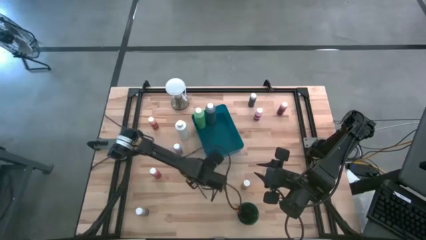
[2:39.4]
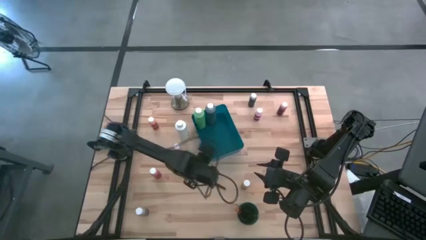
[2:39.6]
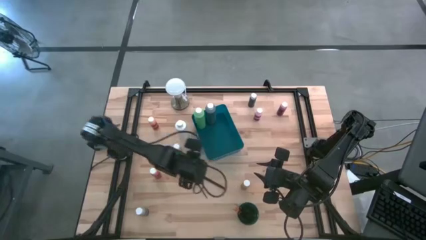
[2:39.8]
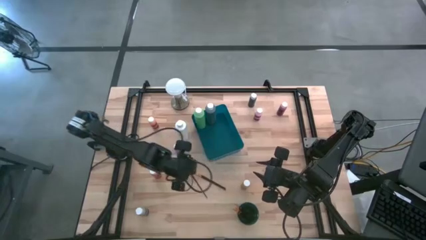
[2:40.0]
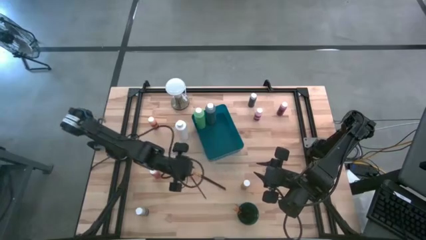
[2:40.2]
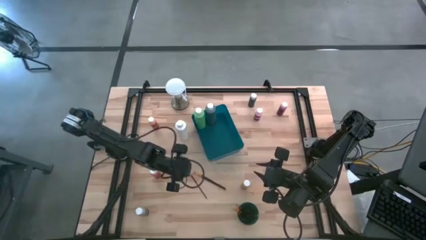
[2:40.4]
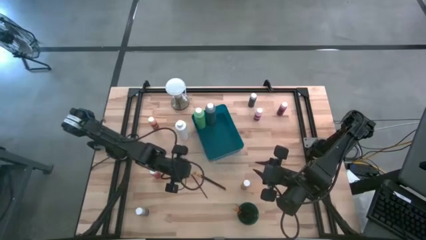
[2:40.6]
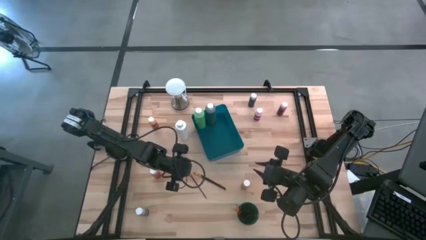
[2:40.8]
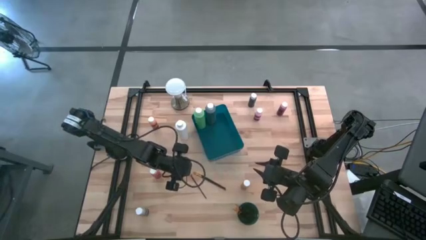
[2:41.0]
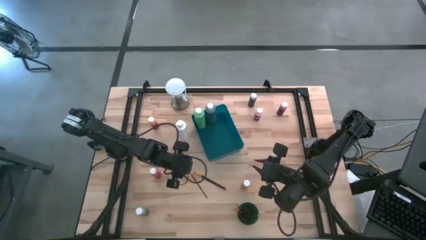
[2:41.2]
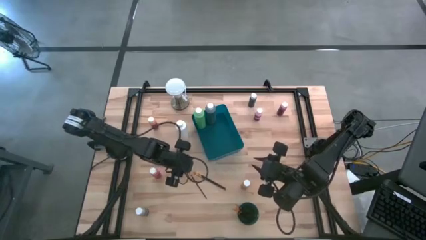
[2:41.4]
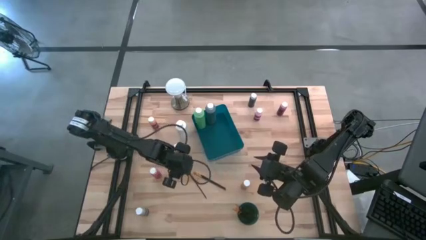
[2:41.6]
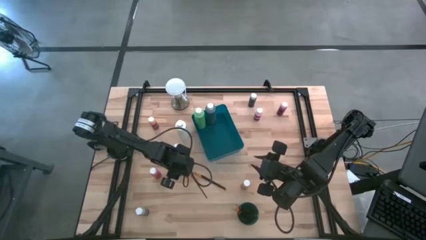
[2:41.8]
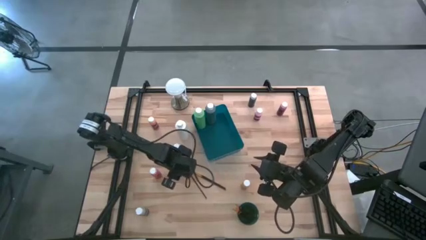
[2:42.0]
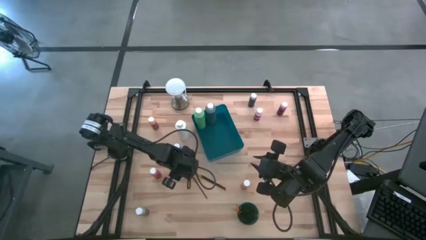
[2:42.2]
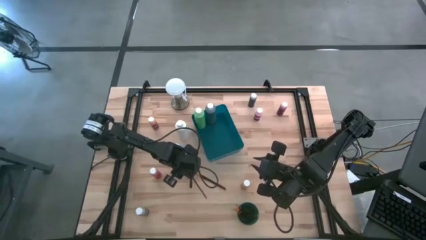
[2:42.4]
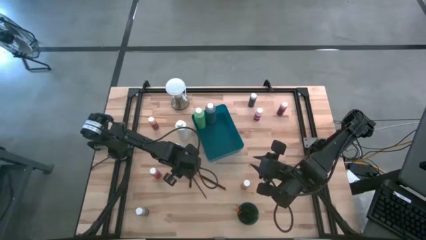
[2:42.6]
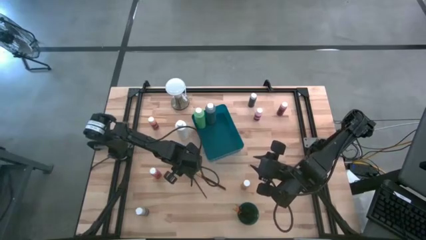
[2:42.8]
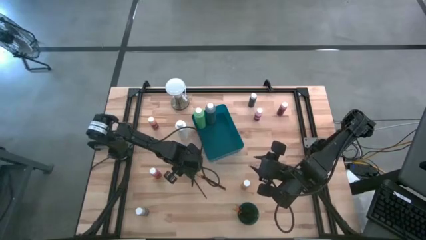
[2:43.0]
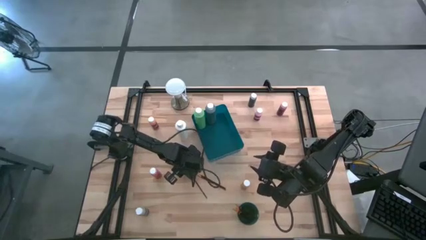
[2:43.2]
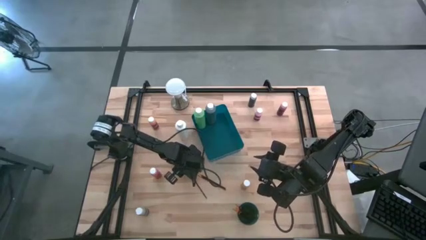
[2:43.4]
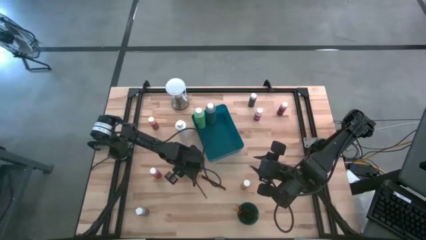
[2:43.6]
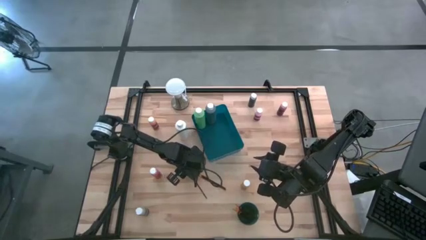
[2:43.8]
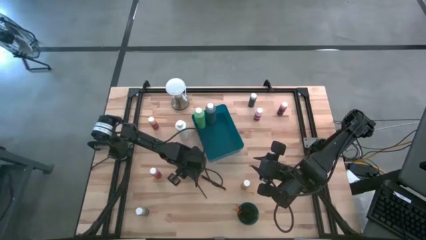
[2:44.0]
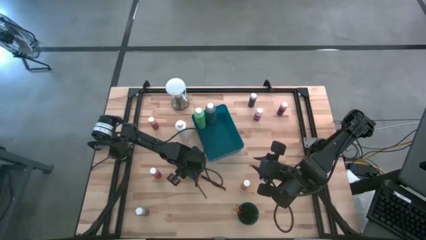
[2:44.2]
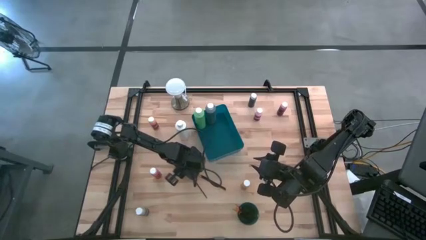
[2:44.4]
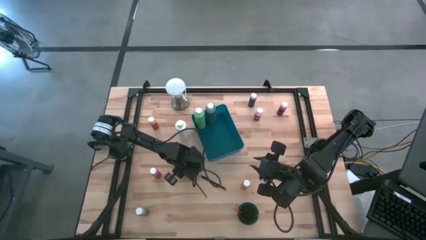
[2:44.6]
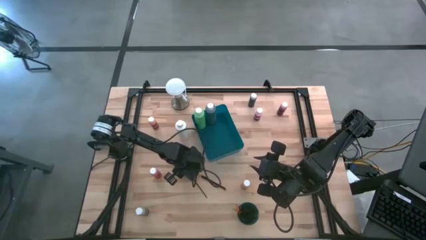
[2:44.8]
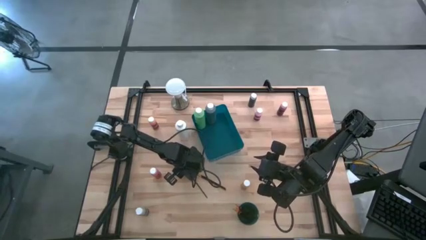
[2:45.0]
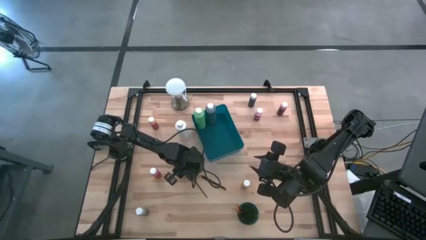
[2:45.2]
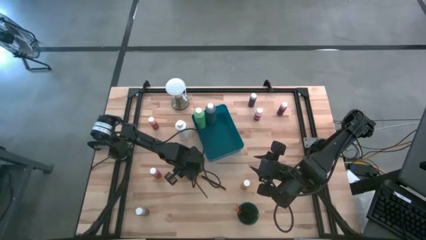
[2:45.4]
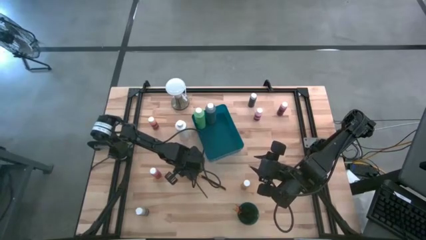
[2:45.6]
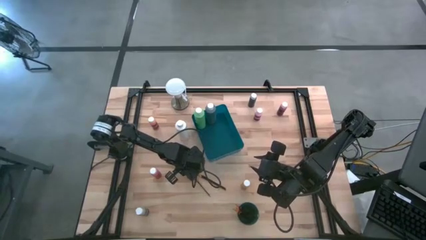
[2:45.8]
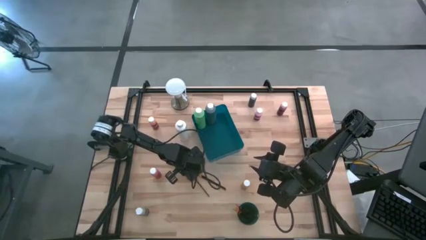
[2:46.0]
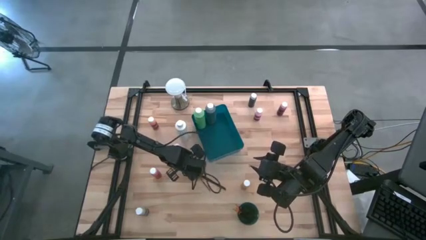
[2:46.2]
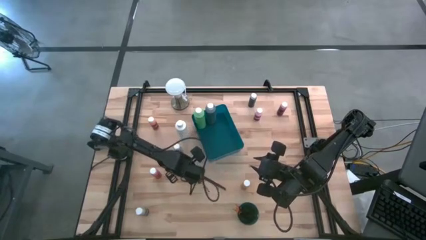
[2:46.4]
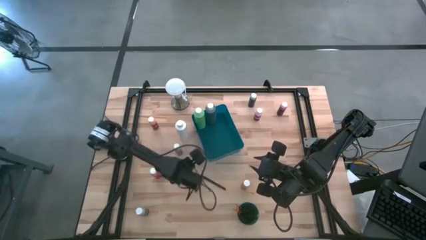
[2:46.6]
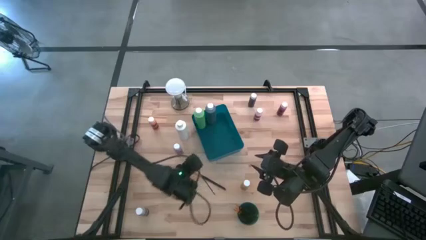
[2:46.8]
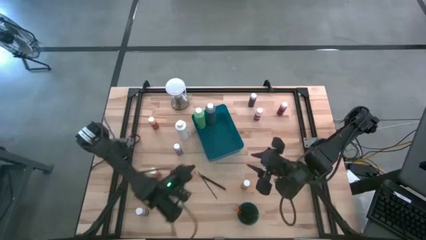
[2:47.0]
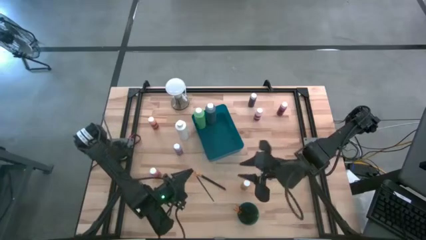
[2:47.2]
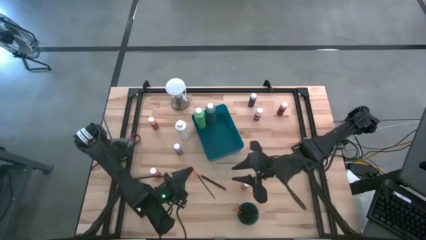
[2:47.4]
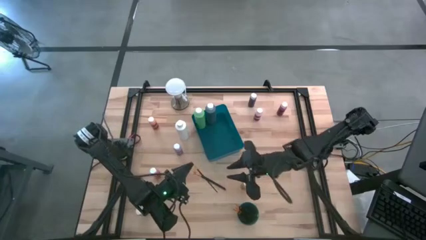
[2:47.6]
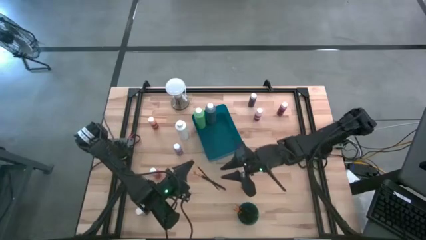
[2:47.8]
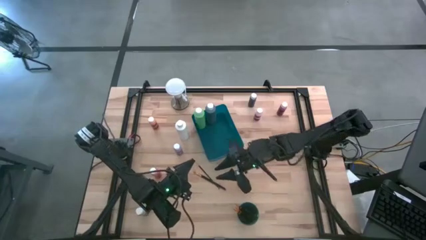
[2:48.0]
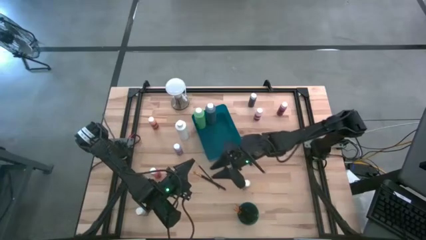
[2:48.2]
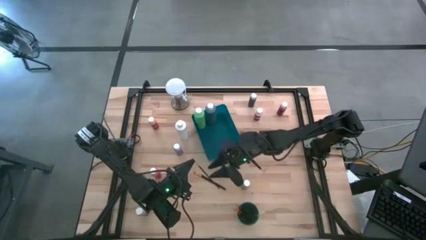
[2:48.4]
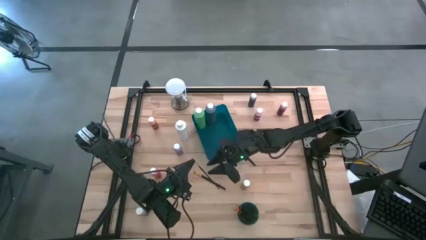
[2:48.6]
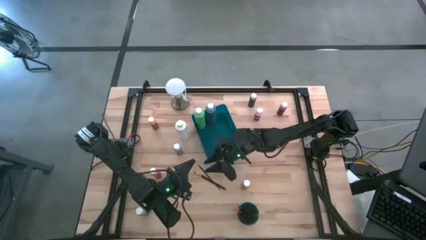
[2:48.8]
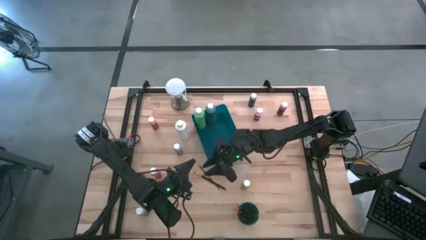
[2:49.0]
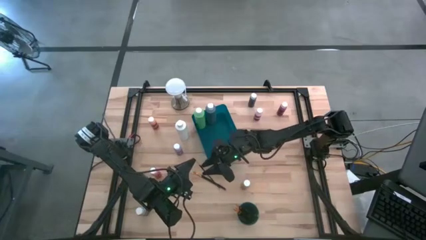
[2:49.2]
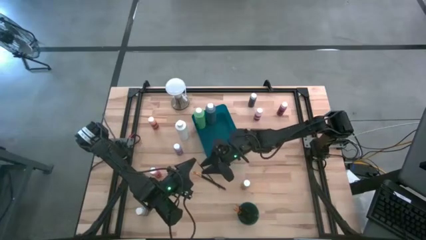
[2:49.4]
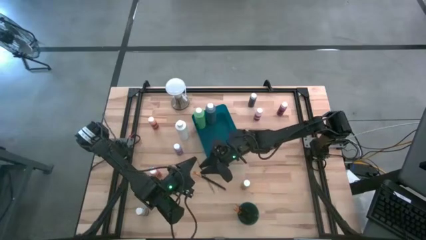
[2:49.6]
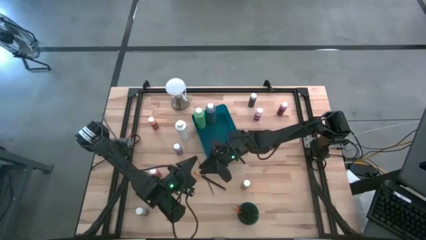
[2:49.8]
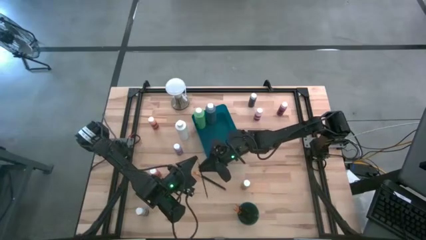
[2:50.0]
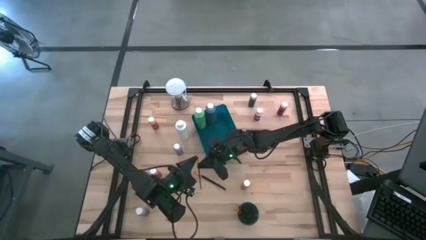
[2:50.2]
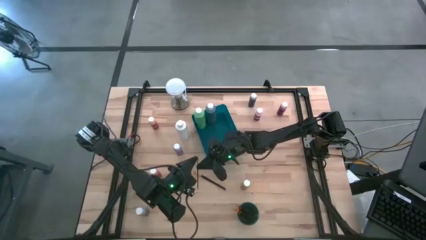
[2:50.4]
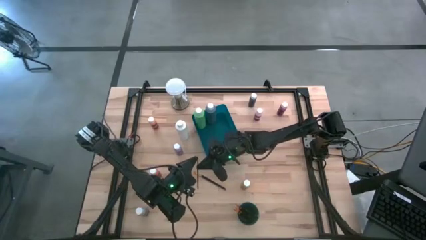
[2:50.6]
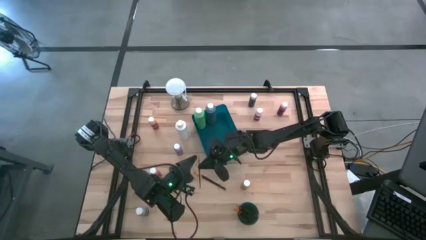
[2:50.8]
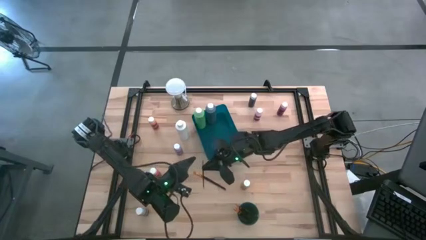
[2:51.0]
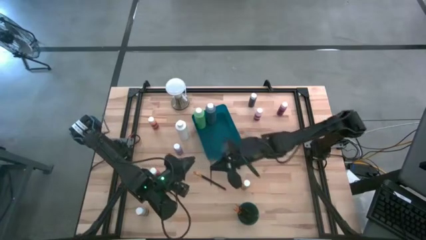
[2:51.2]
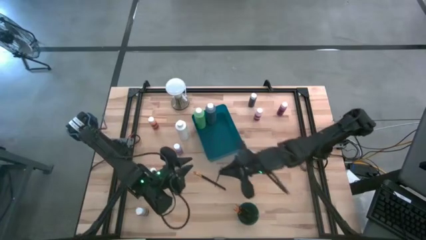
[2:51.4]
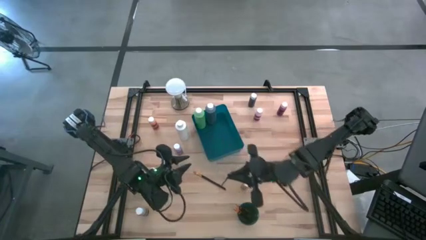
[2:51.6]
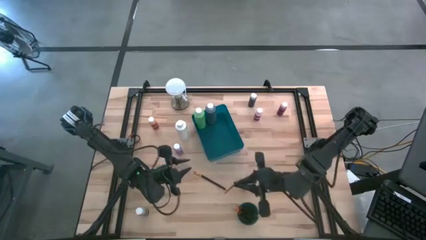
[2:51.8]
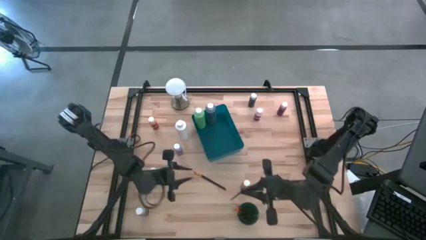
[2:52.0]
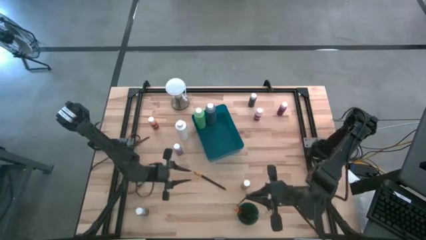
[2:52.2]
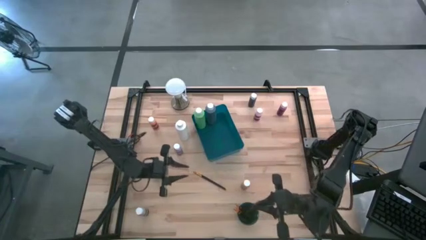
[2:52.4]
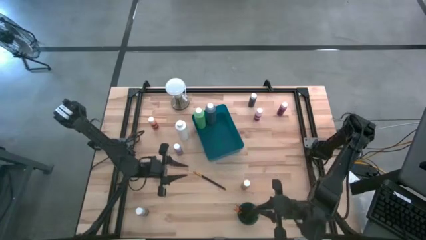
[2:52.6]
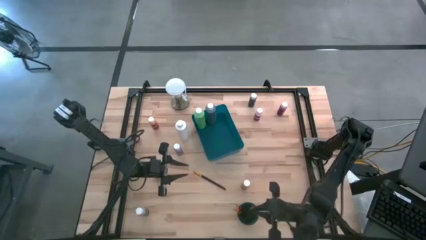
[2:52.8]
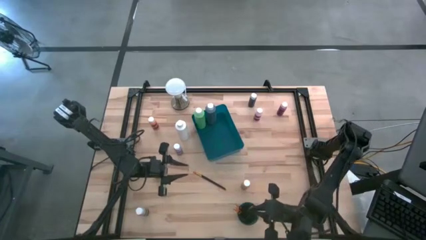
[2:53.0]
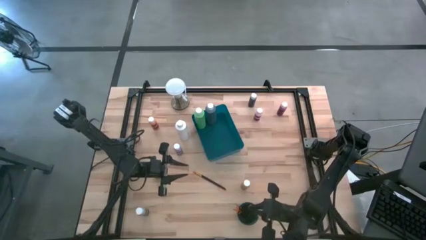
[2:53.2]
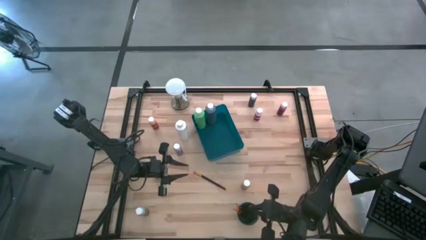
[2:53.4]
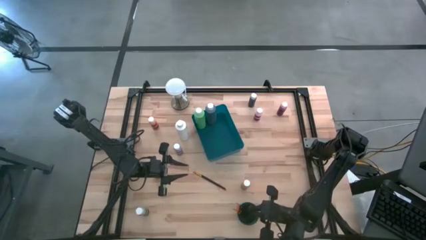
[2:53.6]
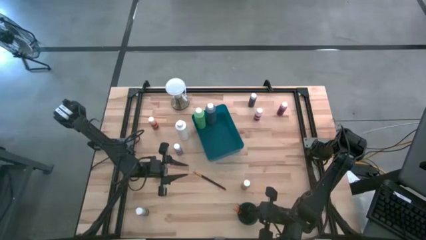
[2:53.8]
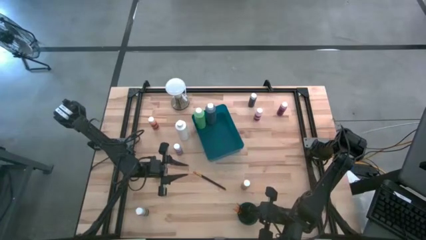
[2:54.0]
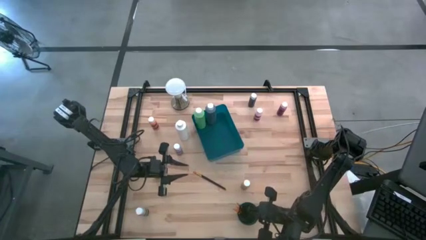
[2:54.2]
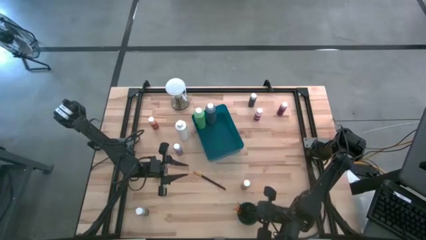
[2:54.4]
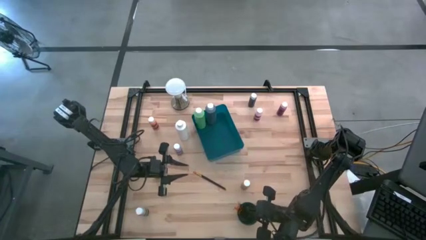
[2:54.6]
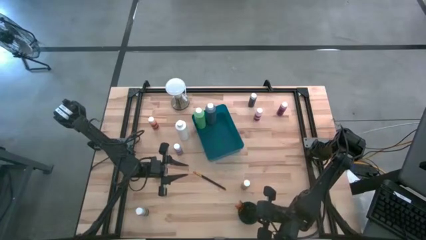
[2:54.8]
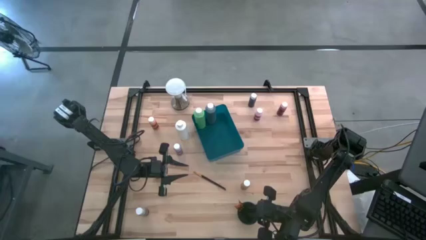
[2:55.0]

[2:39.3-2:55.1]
Task: Pick & Place Paint Supplies
Put the gold paint brush into the green cup
